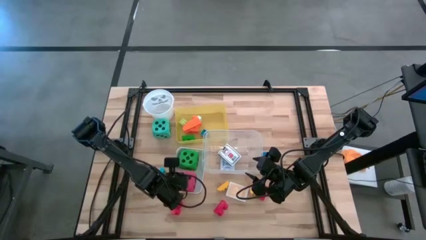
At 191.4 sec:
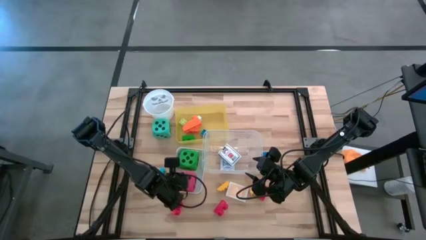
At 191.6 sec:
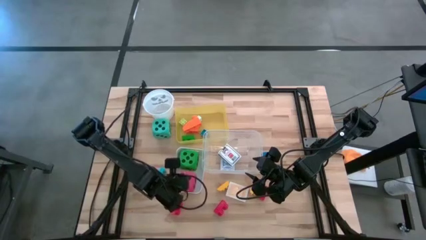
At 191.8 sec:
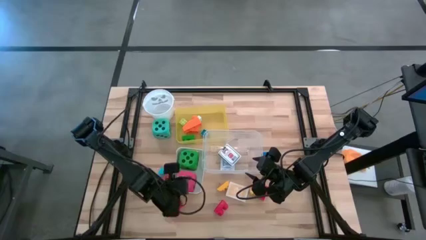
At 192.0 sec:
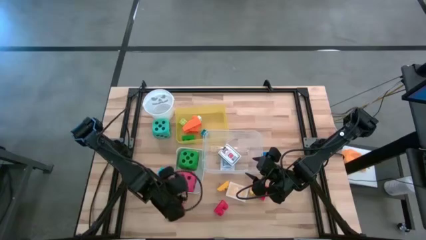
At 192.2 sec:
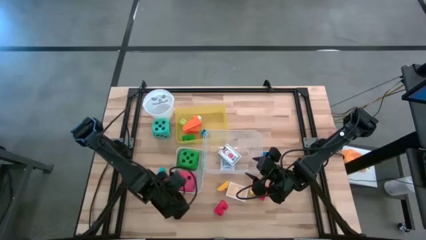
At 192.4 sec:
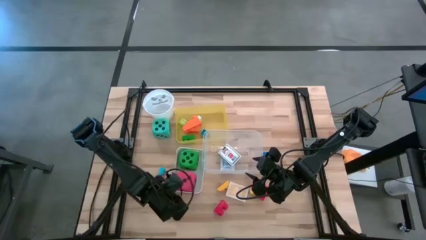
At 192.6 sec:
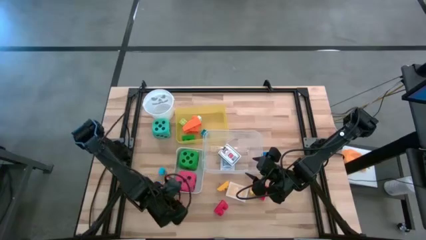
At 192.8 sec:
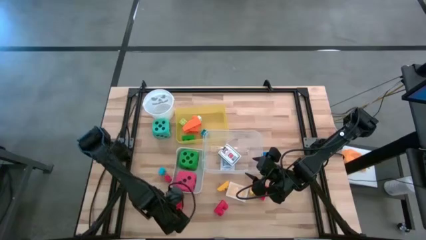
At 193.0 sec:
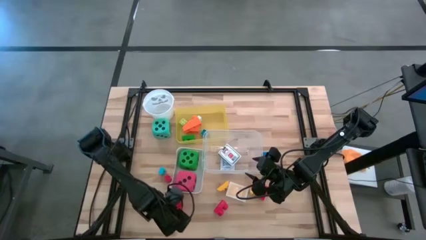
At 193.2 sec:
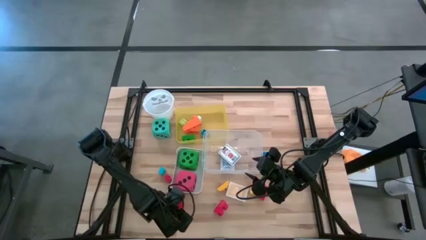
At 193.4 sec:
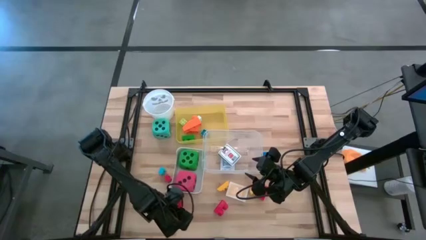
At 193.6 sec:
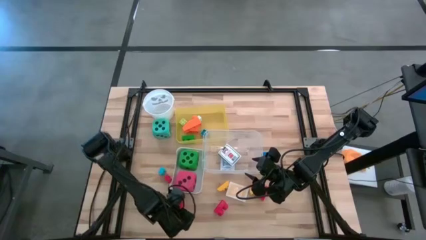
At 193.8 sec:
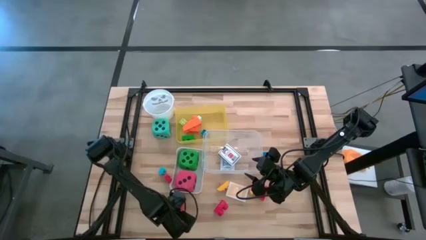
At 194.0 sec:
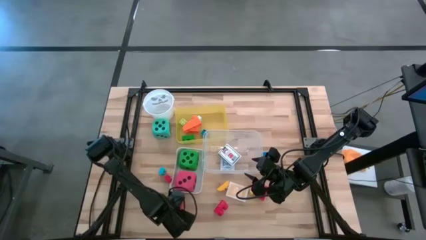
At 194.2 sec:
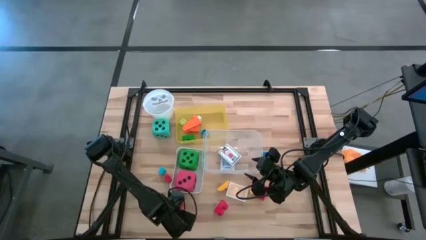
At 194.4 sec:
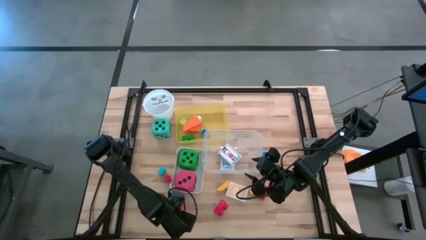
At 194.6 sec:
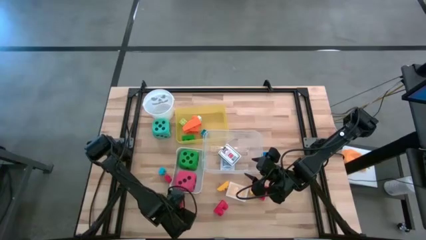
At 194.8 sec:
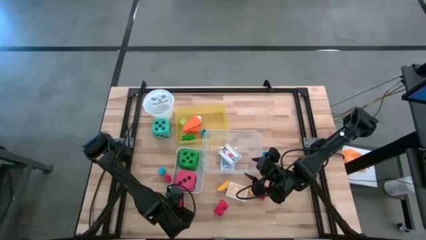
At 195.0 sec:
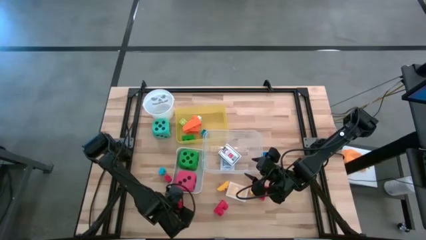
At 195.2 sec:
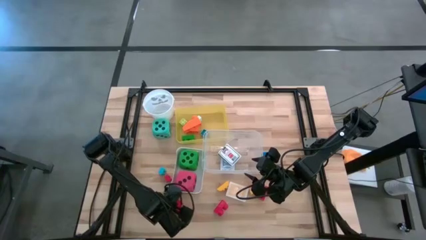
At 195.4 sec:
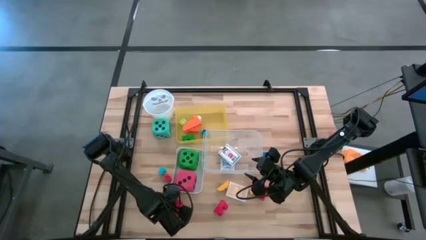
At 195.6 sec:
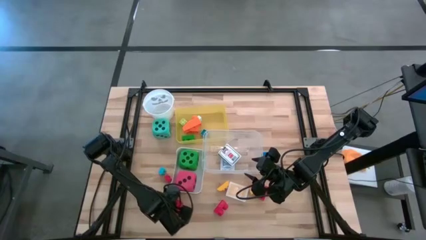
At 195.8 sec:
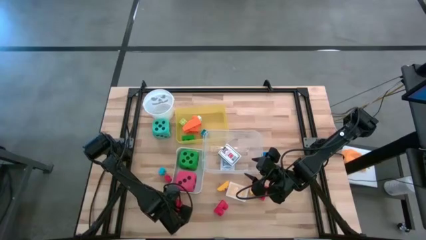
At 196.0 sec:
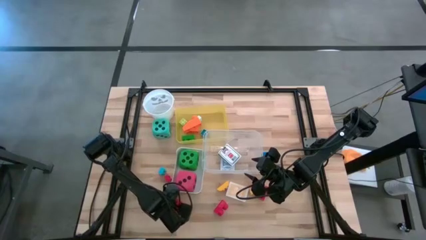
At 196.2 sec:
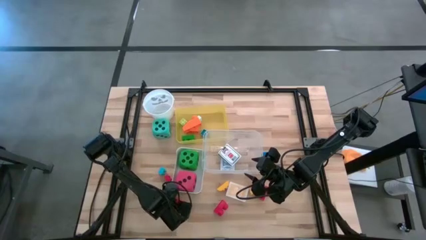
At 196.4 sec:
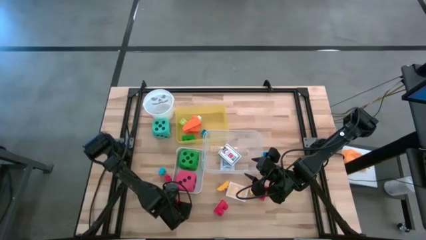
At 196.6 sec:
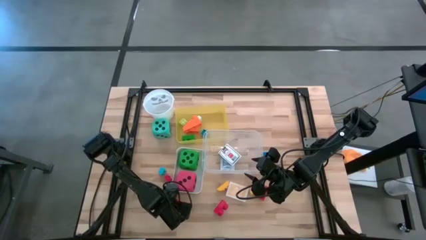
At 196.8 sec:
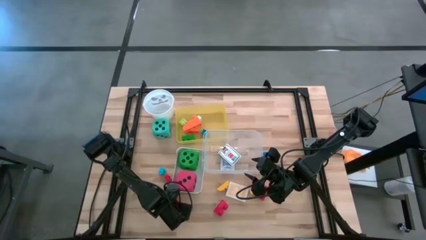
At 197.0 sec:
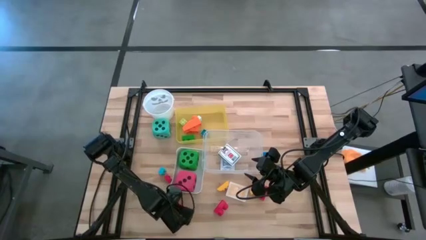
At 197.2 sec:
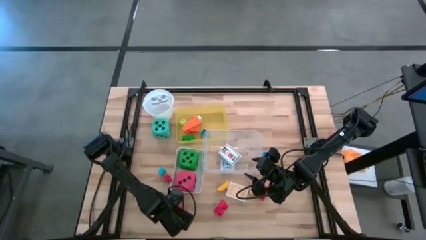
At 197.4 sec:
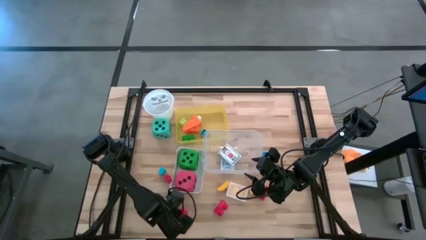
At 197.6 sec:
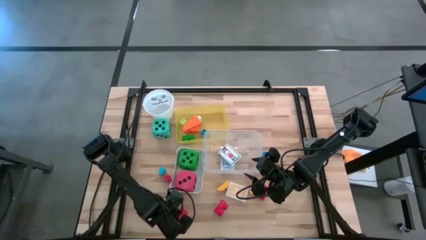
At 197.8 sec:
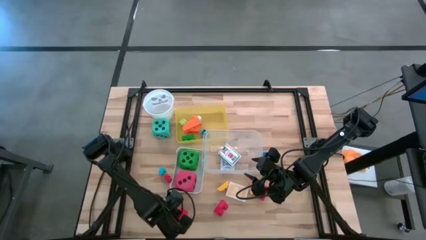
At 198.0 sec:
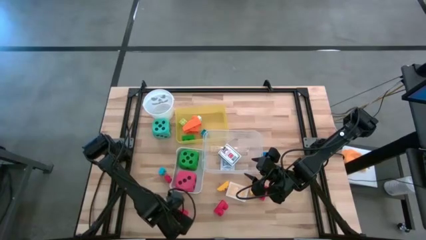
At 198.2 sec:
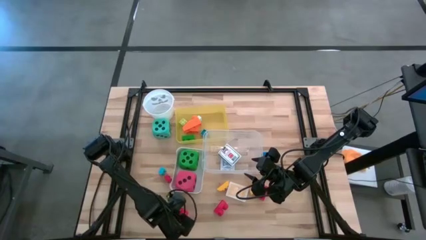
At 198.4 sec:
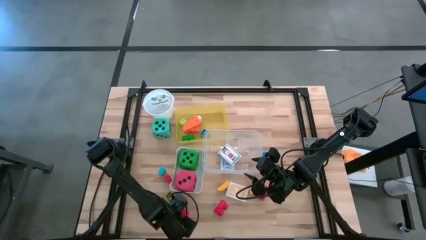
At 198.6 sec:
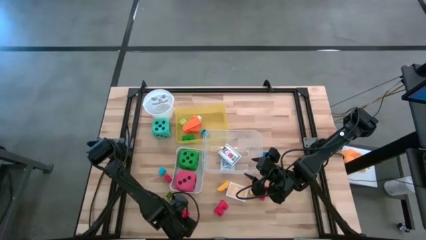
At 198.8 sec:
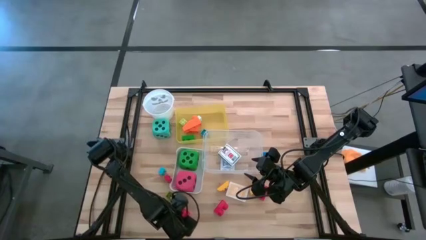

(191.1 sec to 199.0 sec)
Task: Pick & Place Toys
Put the orange game piece into the yellow bin

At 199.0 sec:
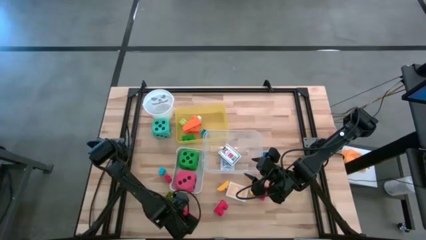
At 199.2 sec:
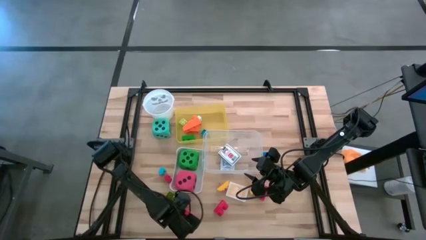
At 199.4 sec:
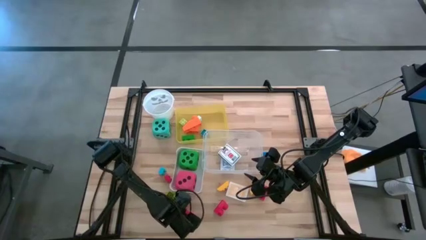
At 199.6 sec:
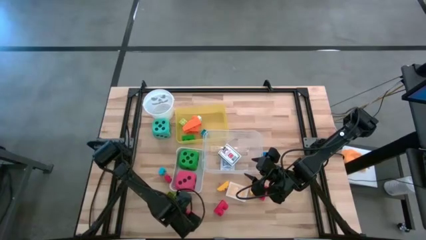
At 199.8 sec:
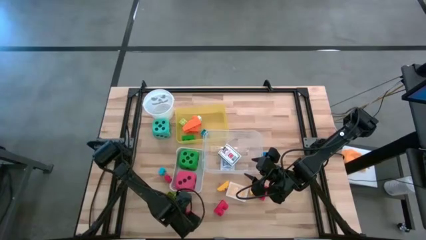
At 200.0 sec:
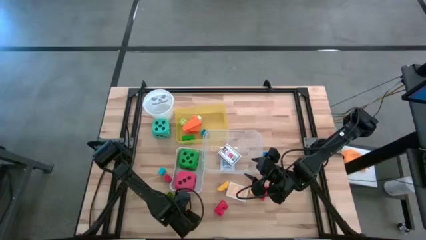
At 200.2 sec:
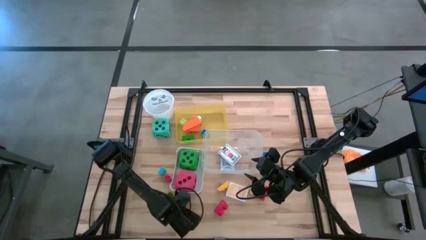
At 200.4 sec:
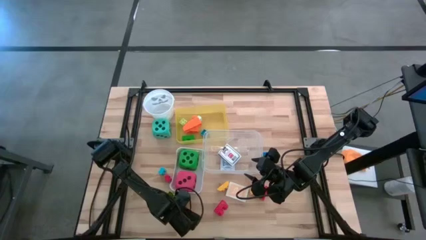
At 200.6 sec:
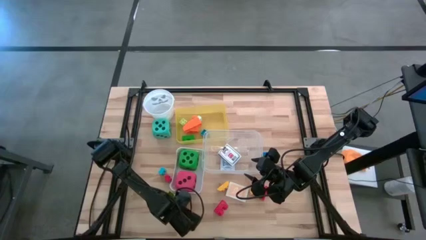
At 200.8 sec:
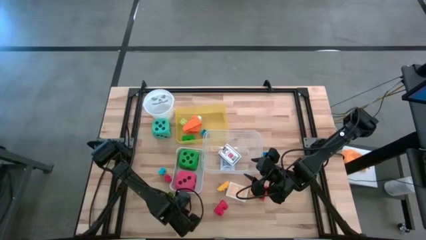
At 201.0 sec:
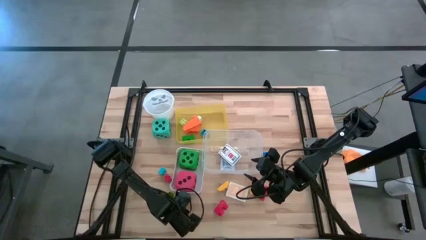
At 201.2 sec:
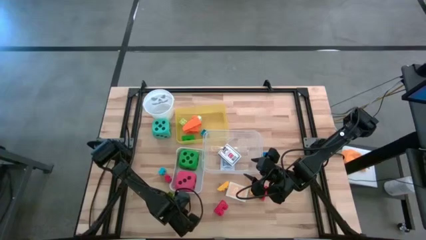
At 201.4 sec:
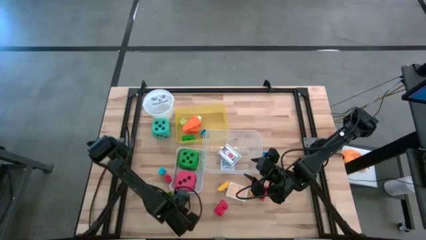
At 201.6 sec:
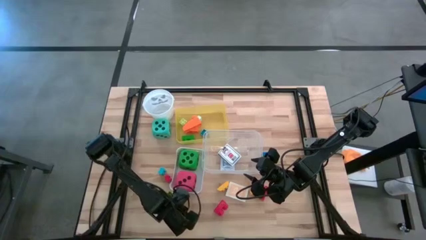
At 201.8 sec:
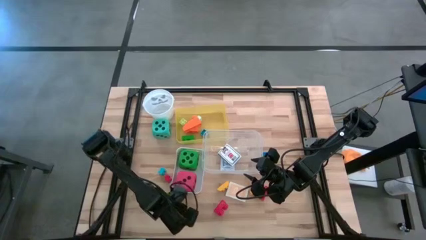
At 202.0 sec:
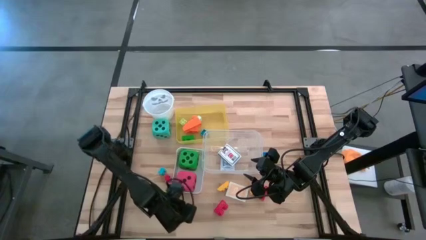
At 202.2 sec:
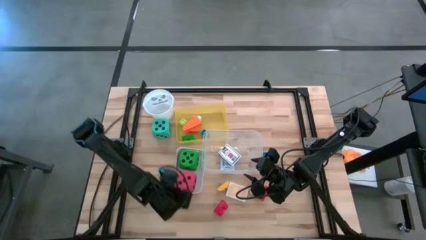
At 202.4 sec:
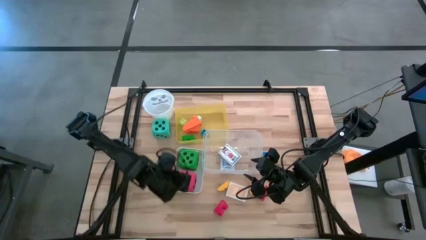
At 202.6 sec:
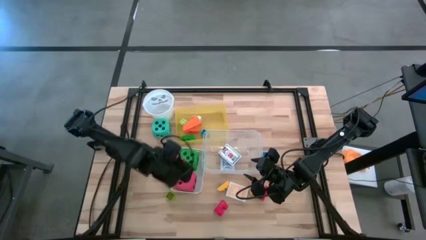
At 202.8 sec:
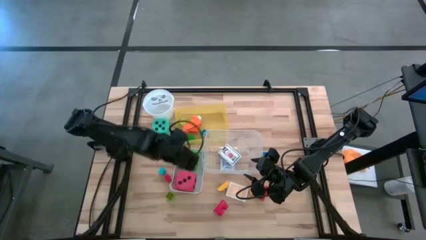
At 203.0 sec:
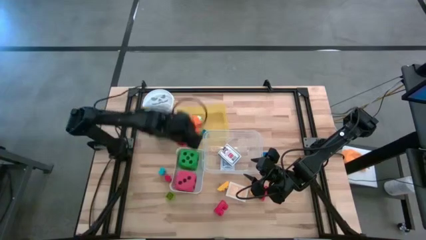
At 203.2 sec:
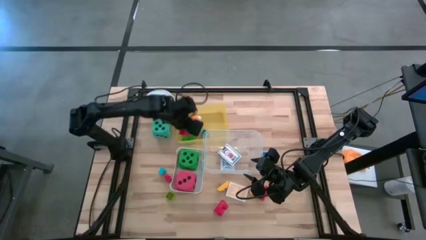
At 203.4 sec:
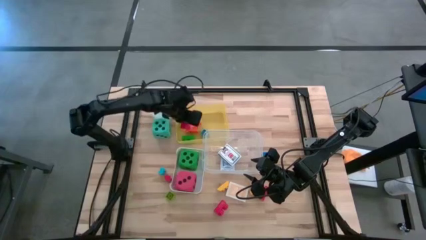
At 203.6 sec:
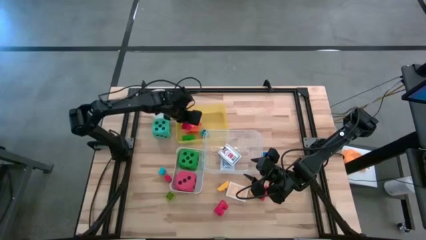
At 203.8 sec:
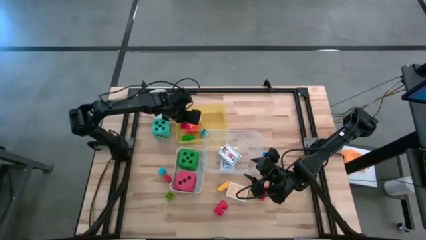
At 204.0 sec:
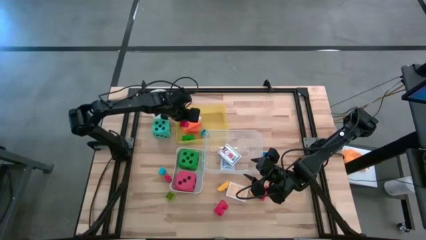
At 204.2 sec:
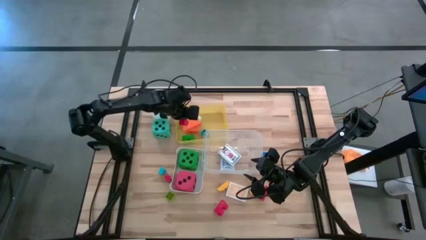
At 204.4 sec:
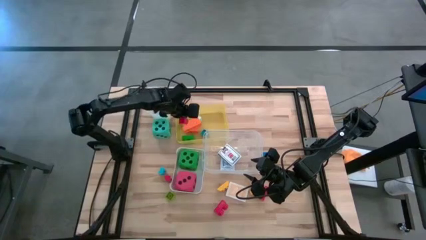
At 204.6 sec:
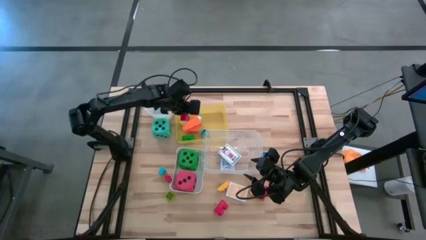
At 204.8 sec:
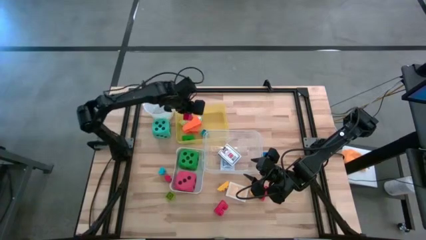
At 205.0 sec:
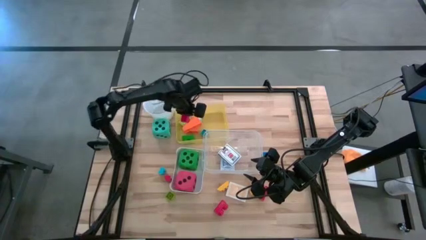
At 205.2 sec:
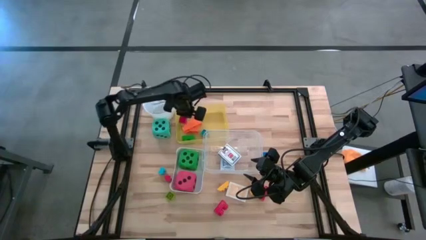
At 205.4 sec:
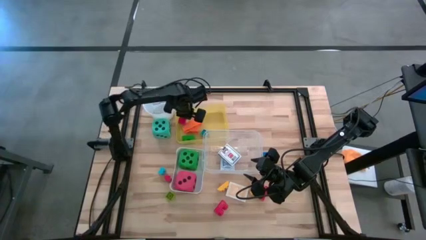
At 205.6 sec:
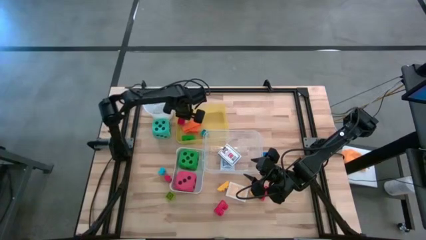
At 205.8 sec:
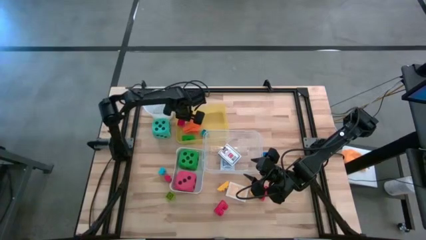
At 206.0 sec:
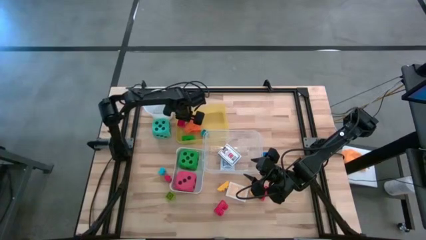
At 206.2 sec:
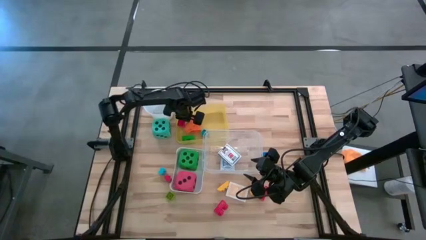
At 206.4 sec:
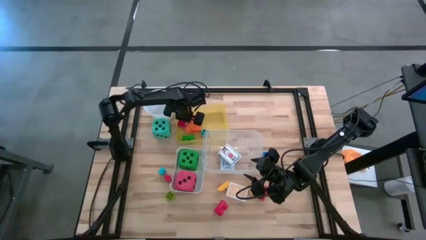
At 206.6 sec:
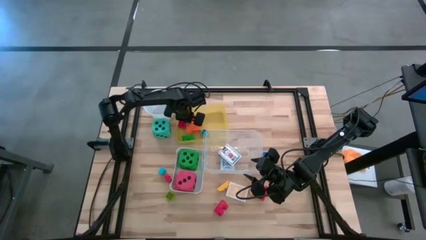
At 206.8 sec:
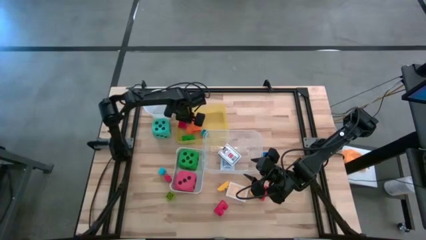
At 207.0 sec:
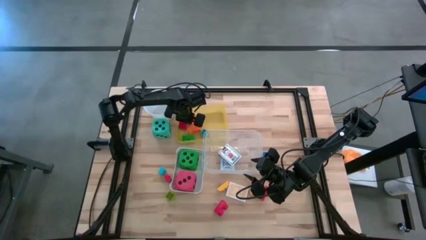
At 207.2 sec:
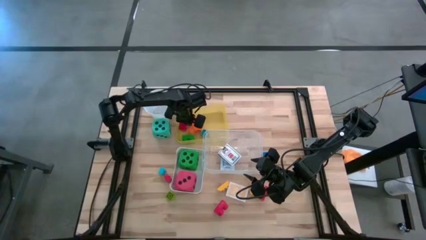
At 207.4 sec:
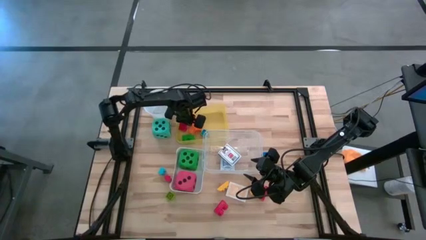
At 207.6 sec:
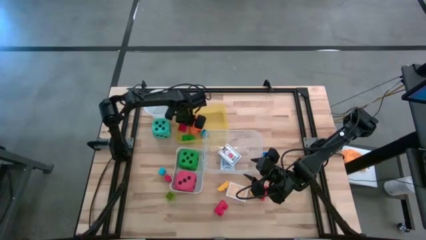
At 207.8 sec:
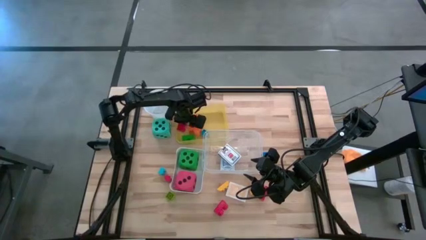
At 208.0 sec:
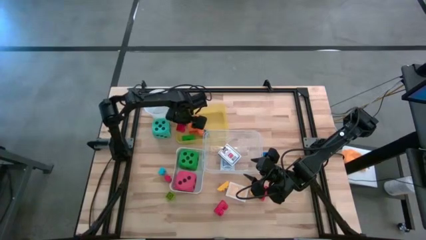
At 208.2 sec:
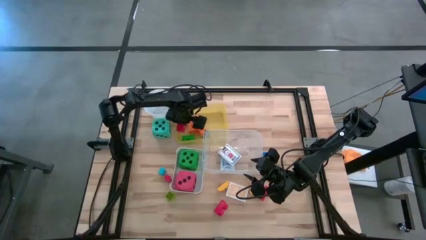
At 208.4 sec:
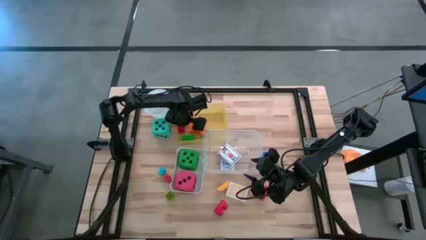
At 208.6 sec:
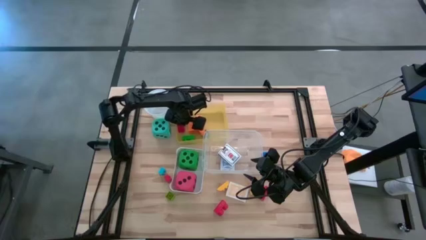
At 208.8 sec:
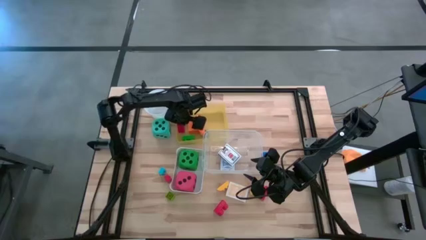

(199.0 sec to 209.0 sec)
Put the orange game piece into the yellow bin
